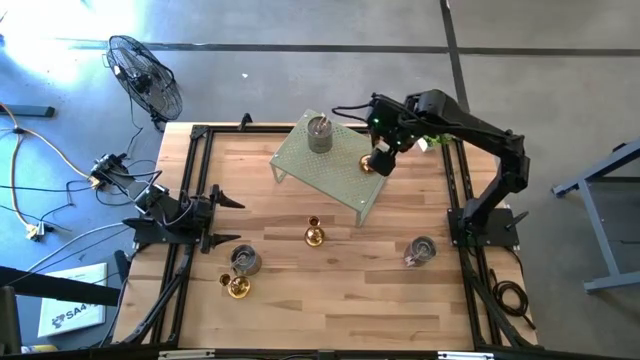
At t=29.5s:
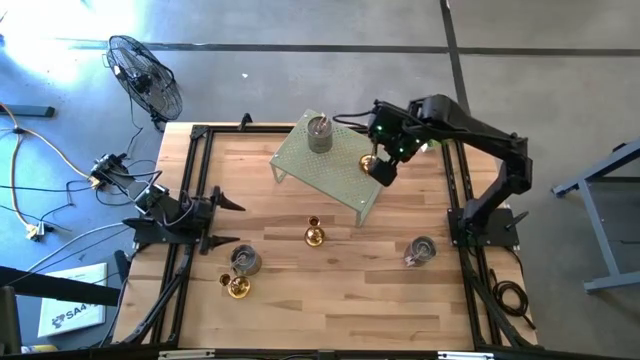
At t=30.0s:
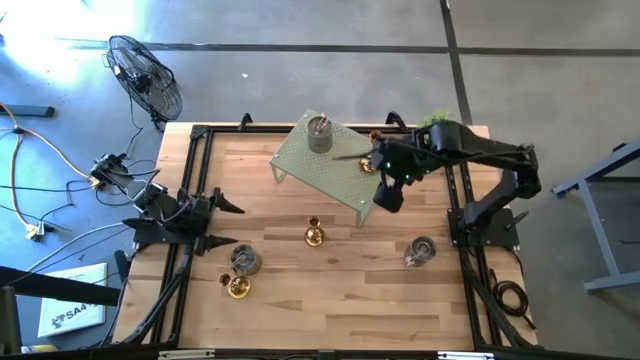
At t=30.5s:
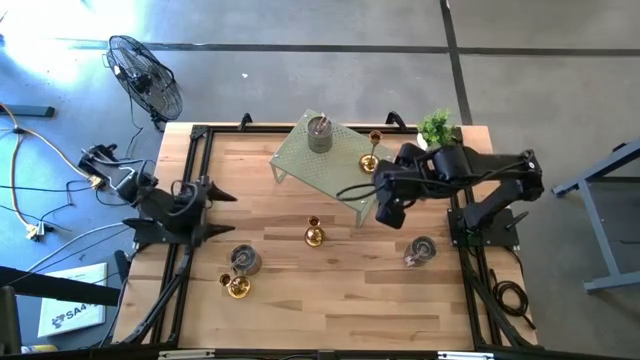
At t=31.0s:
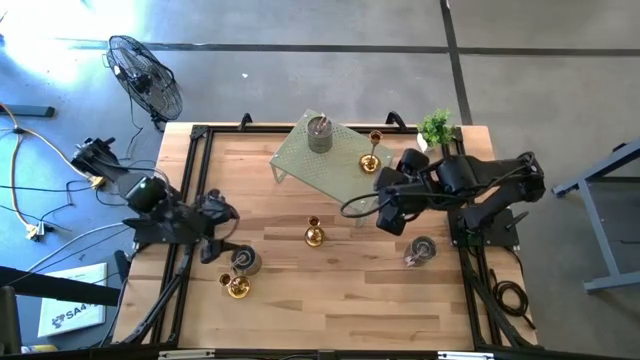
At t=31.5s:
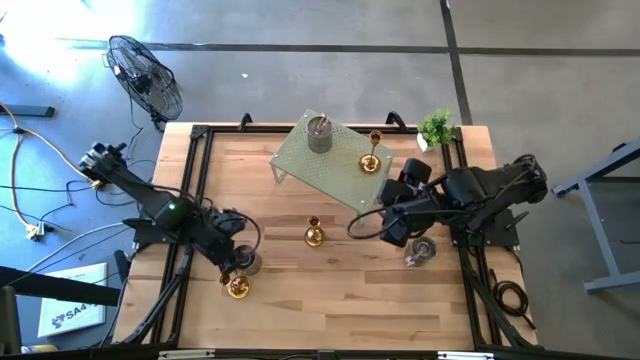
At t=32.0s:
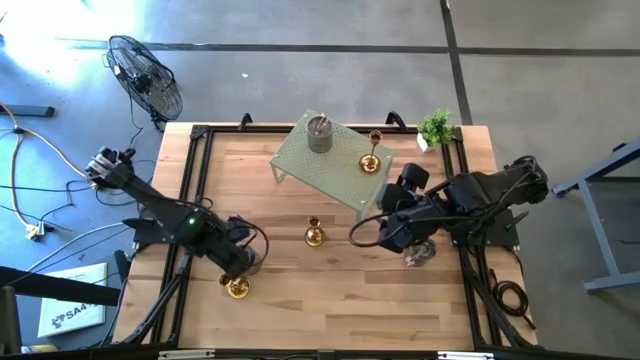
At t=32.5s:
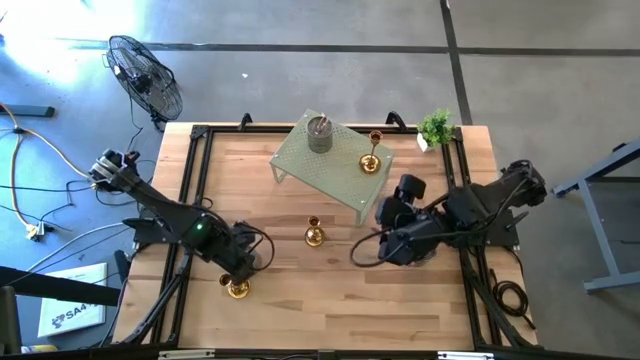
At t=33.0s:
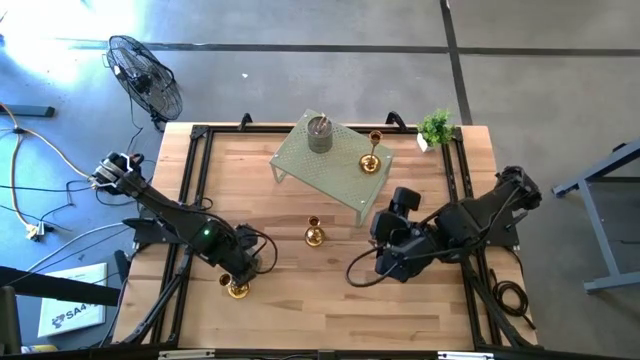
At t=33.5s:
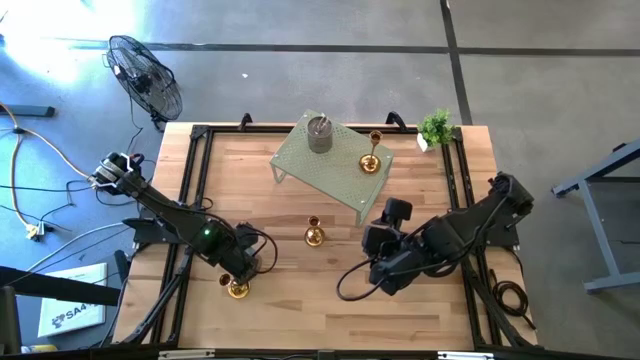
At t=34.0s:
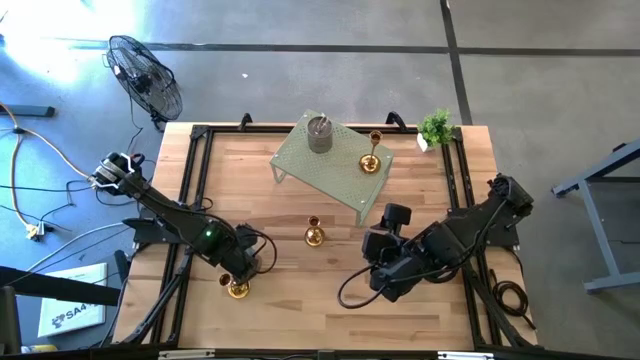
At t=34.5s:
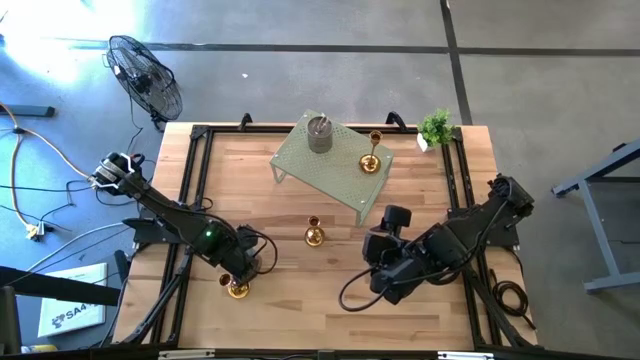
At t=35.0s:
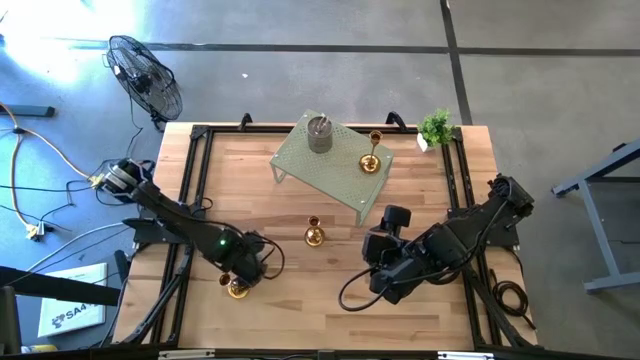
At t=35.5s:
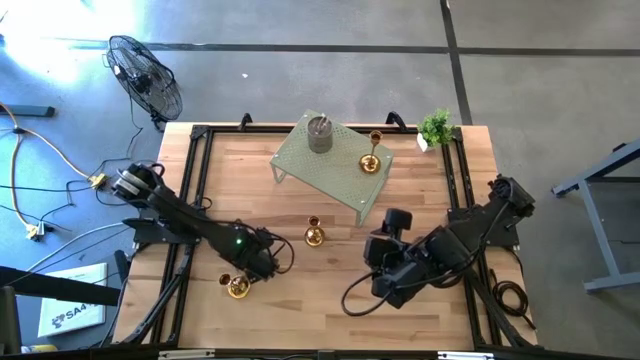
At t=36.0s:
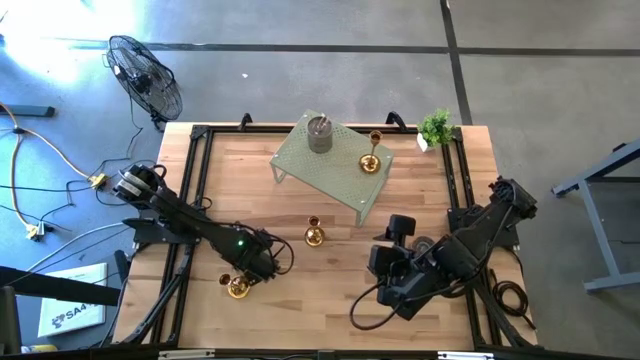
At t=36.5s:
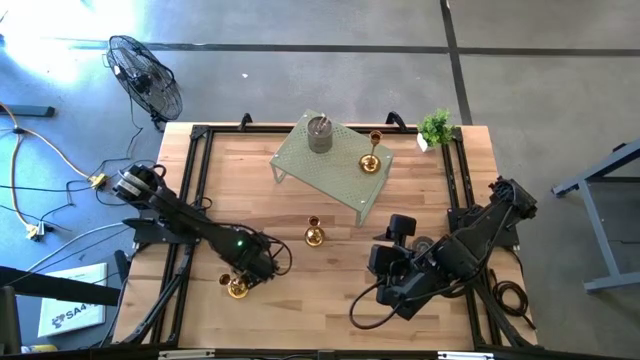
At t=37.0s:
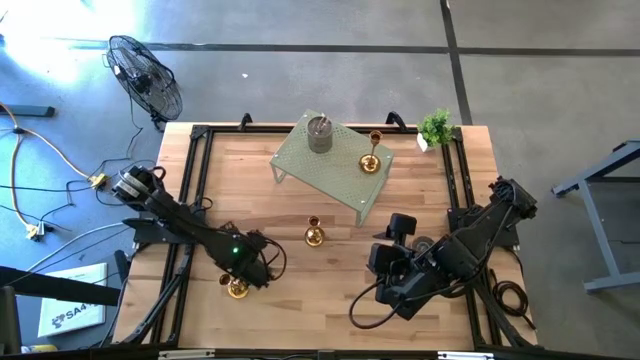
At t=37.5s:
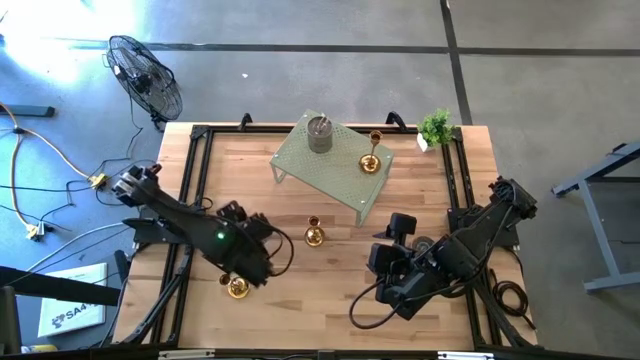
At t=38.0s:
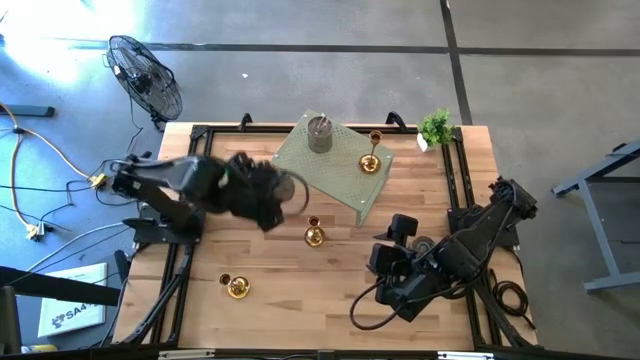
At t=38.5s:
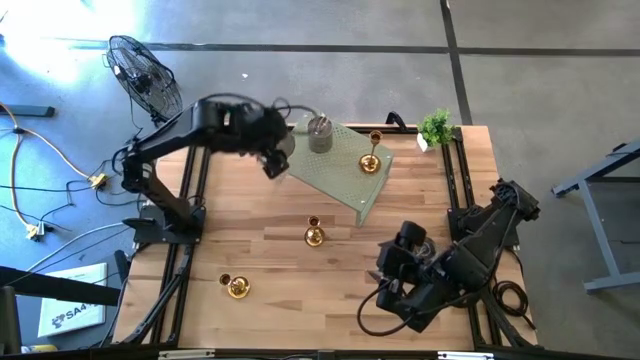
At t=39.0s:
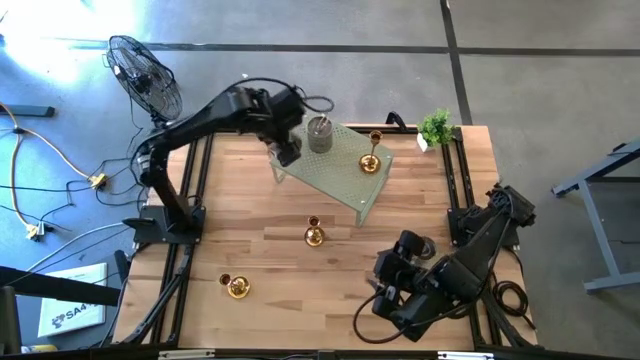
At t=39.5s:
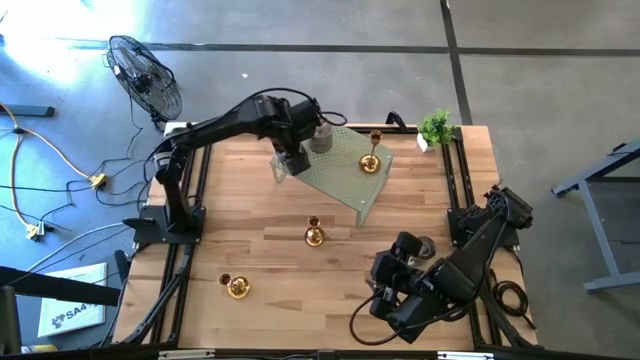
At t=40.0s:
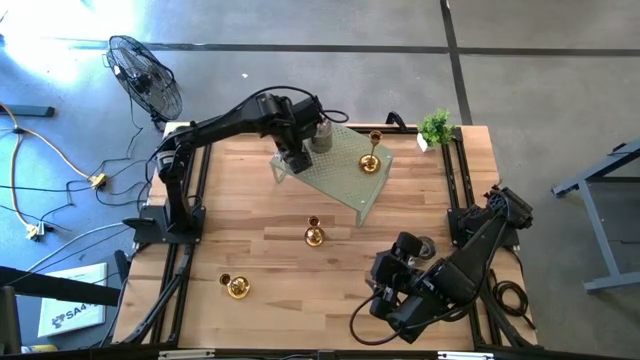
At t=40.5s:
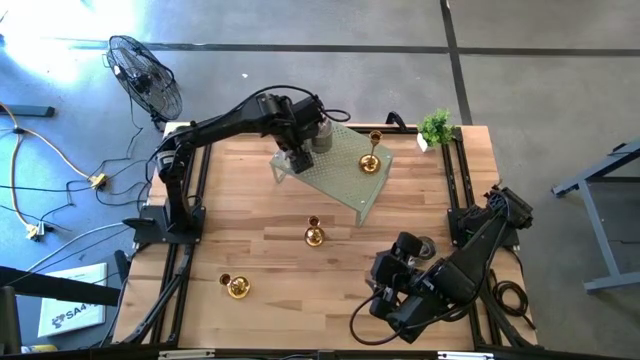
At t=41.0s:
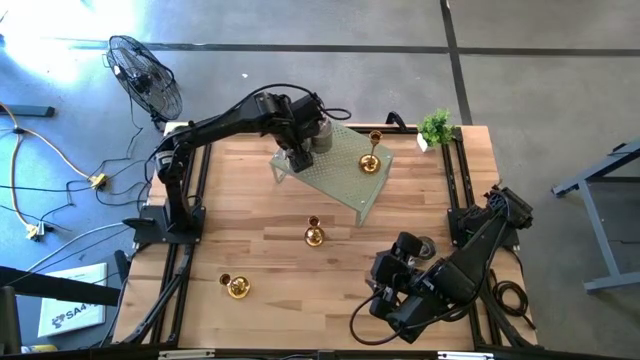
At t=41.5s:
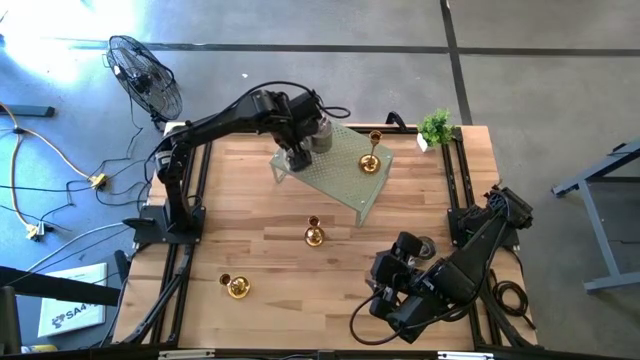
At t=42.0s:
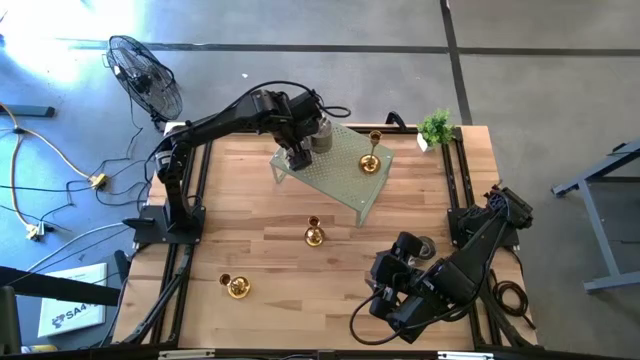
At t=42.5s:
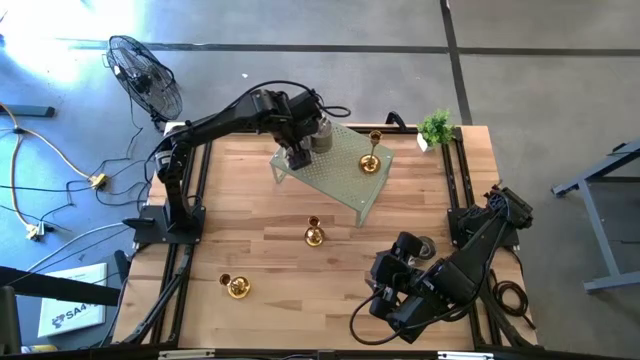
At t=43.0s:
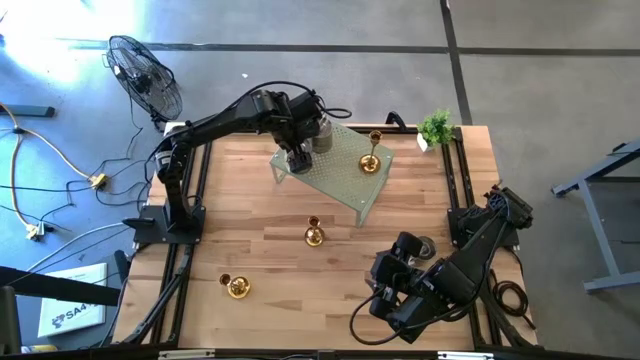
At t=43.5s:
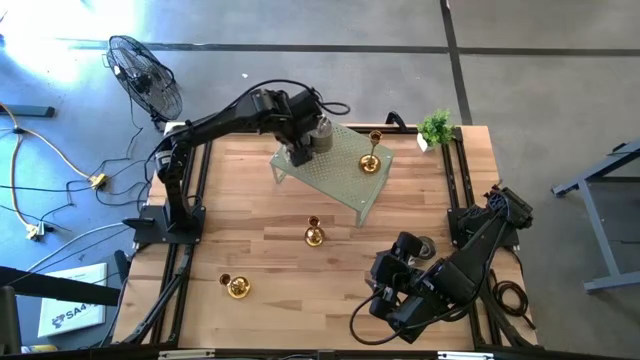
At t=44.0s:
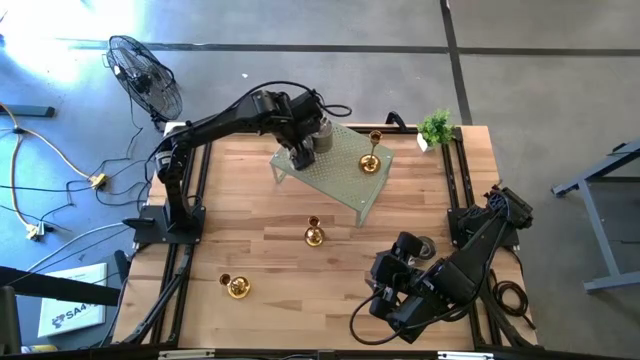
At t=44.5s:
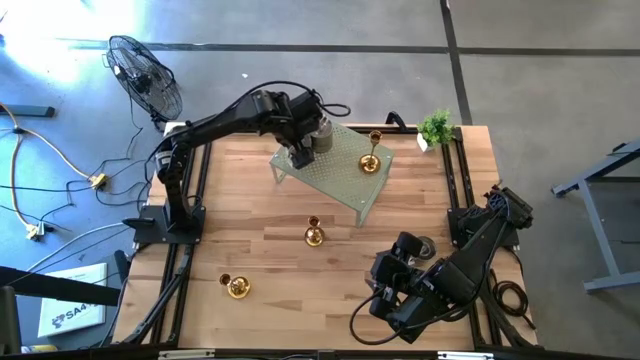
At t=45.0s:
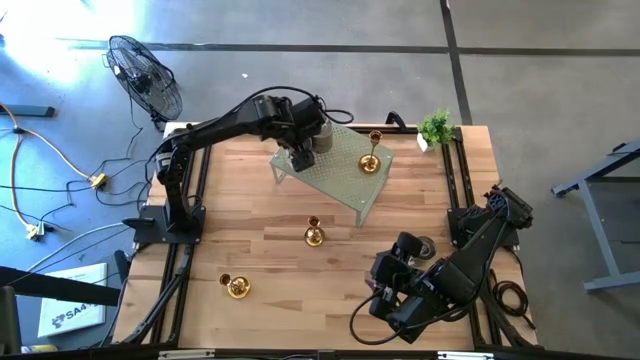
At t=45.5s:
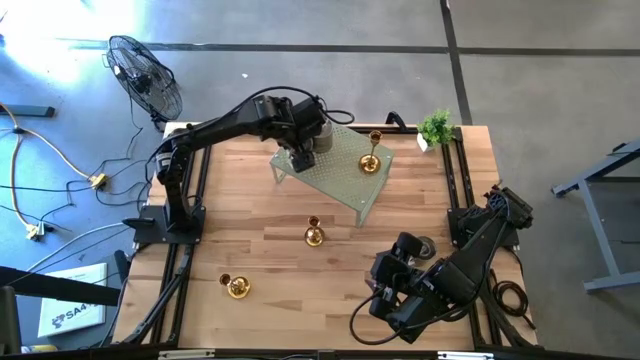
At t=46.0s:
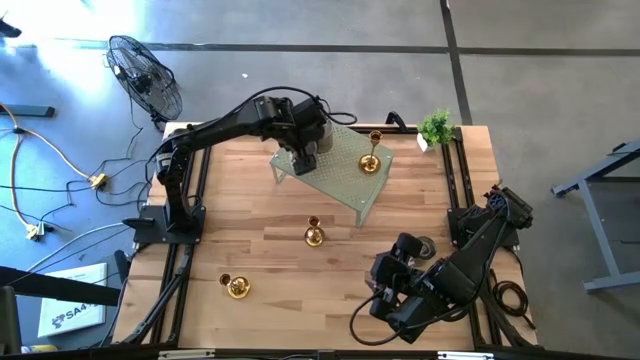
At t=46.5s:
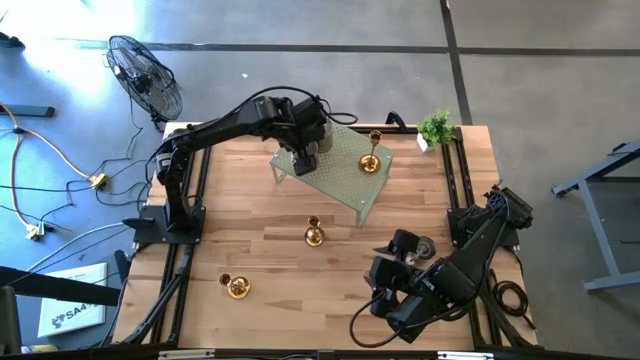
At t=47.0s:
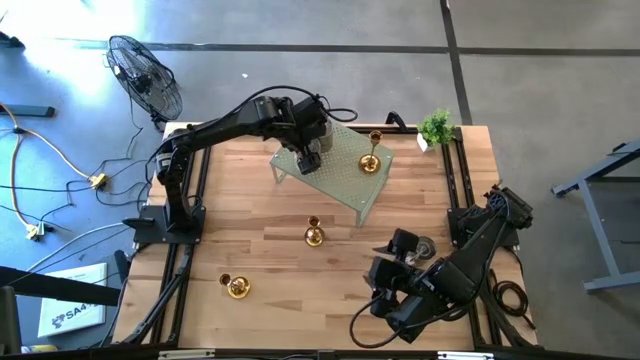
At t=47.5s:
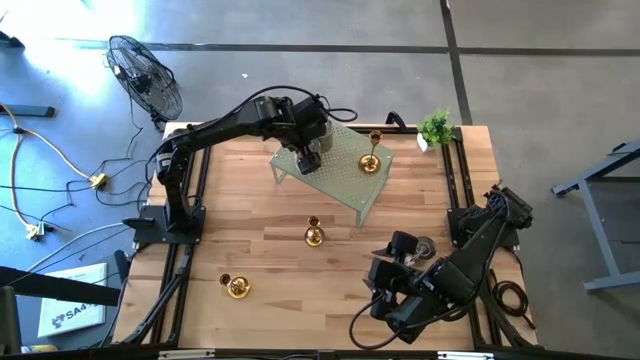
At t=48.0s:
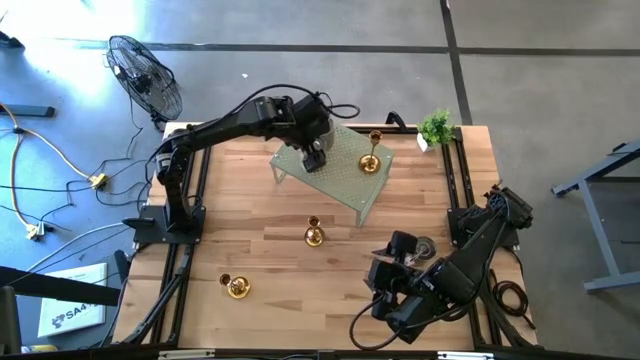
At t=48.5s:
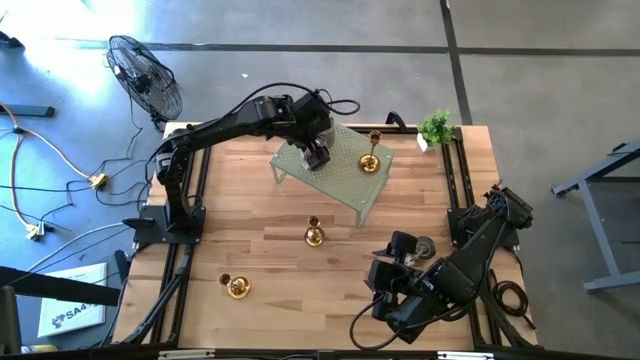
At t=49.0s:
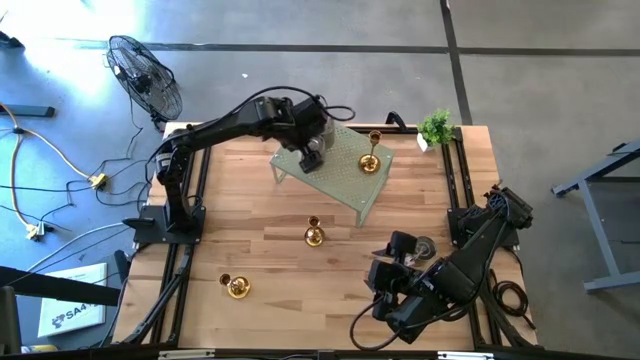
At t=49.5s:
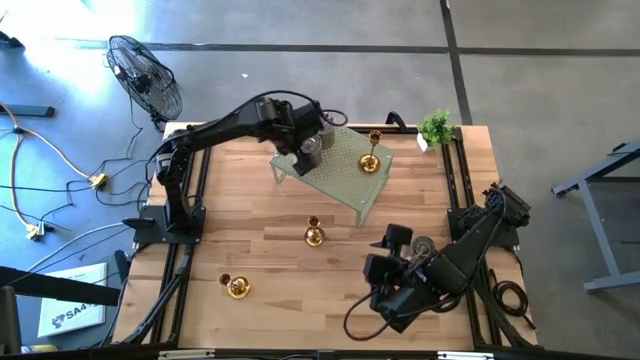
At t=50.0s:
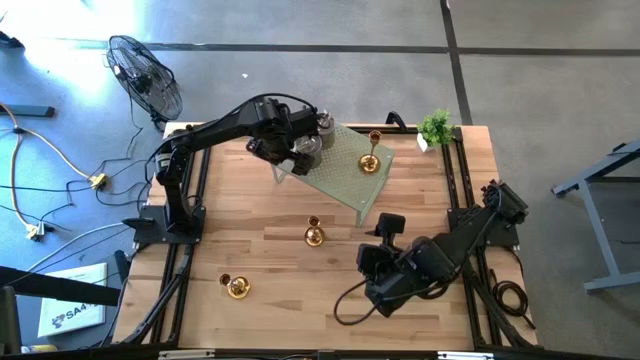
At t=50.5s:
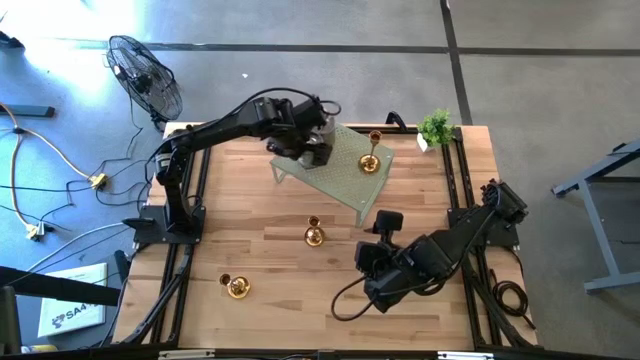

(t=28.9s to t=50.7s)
Task: Pick & Place candle stick holders
Put the green scented candle on the shelf
